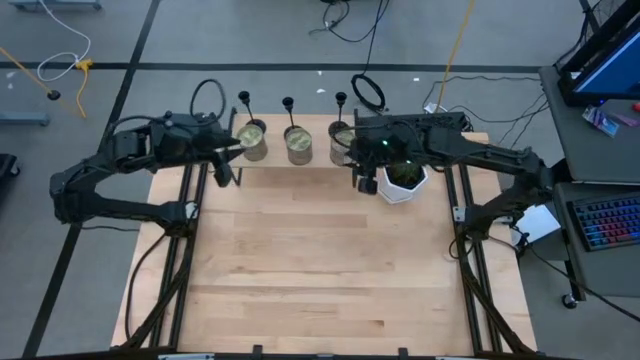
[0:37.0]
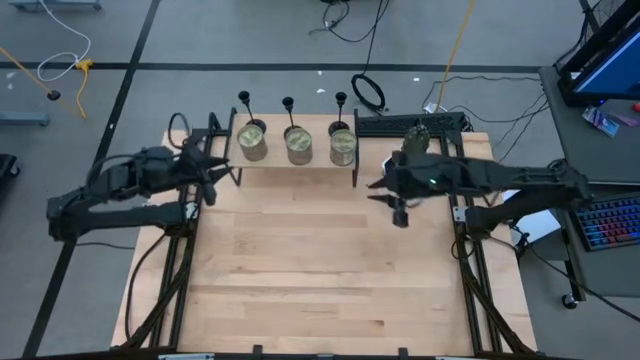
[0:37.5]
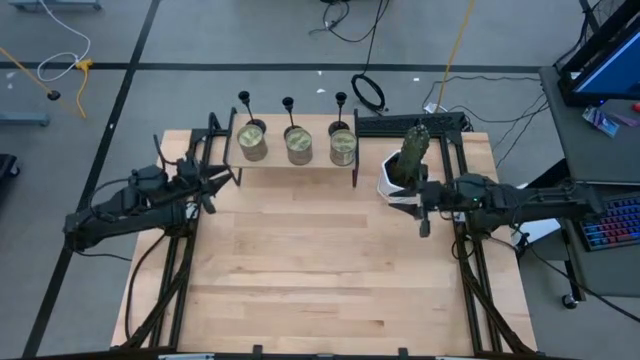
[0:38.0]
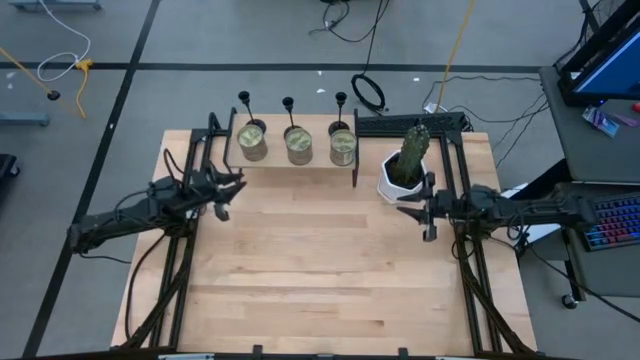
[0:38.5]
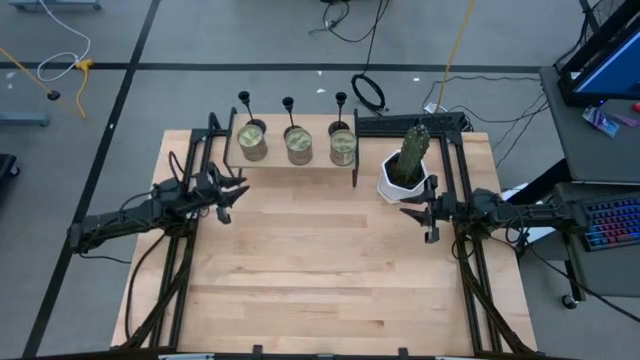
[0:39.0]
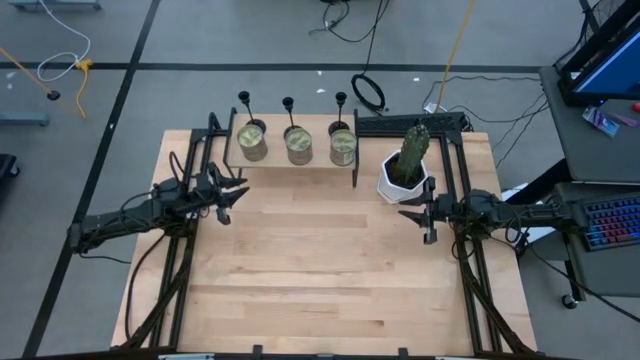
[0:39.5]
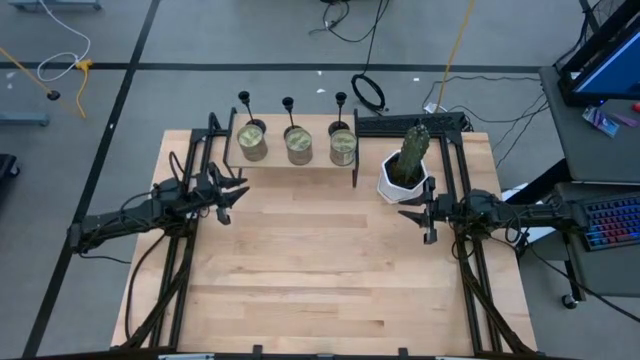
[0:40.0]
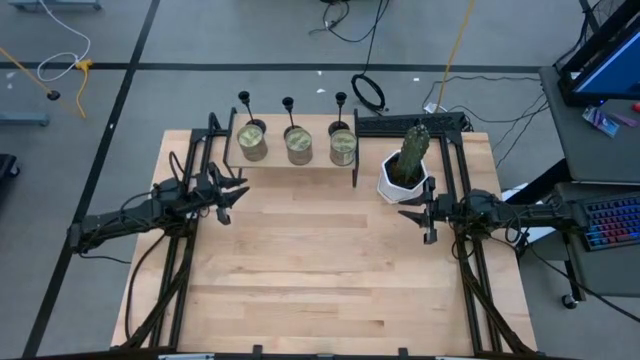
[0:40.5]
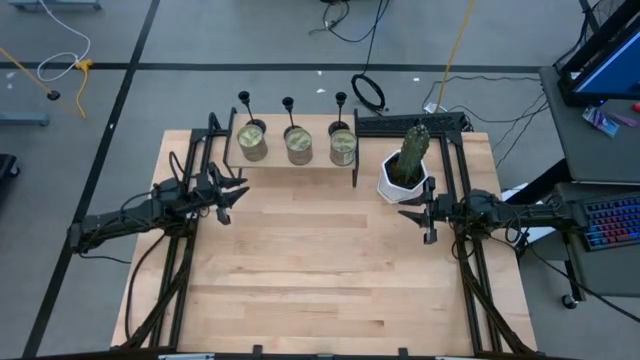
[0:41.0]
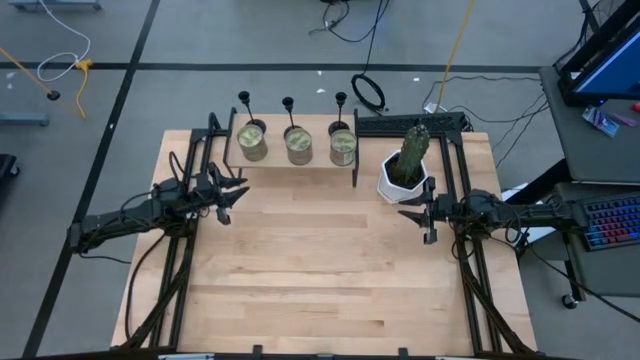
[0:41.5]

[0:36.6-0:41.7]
Task: Pick & Place candle stick holders
Return to Home Position

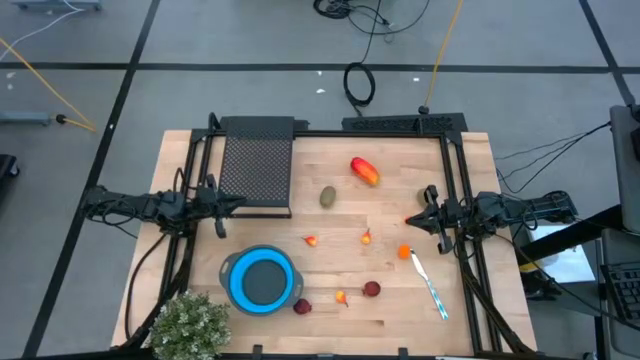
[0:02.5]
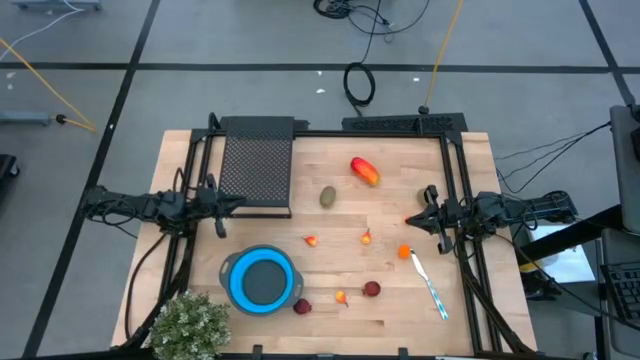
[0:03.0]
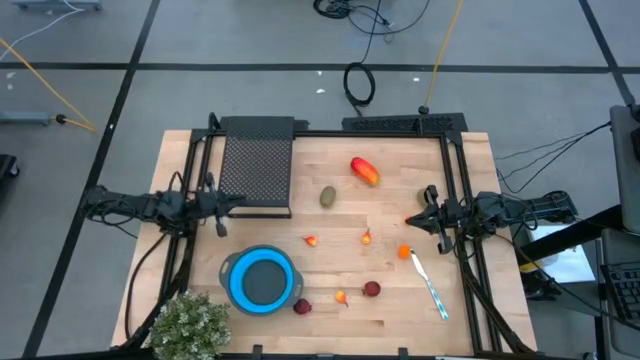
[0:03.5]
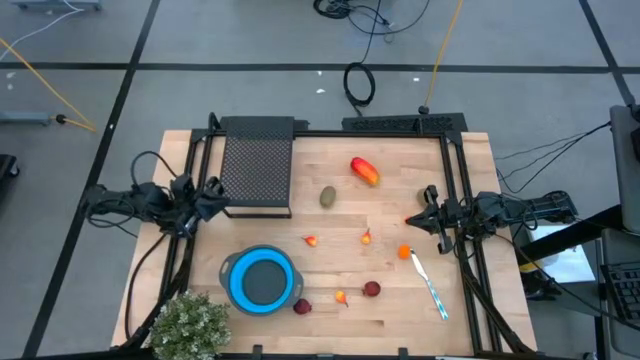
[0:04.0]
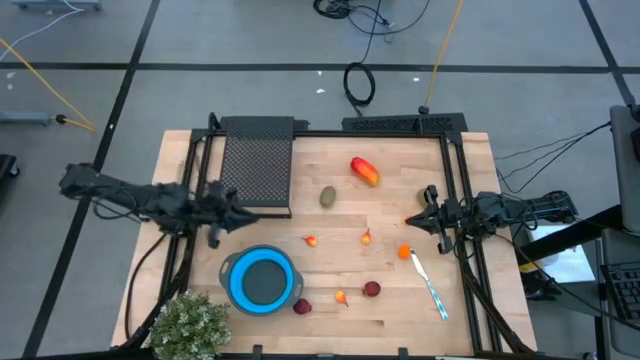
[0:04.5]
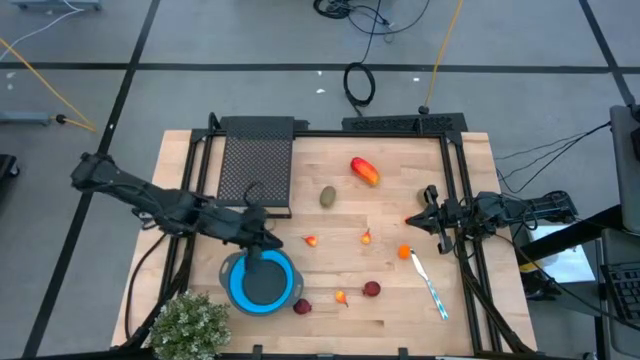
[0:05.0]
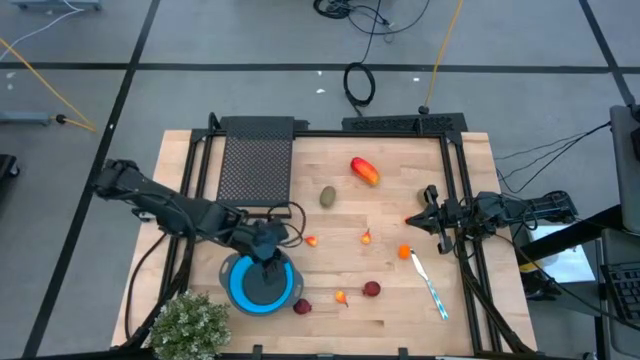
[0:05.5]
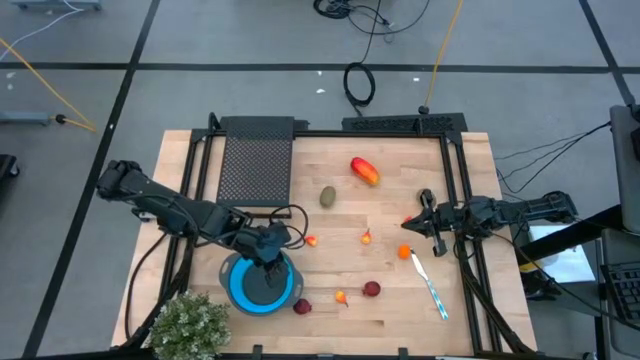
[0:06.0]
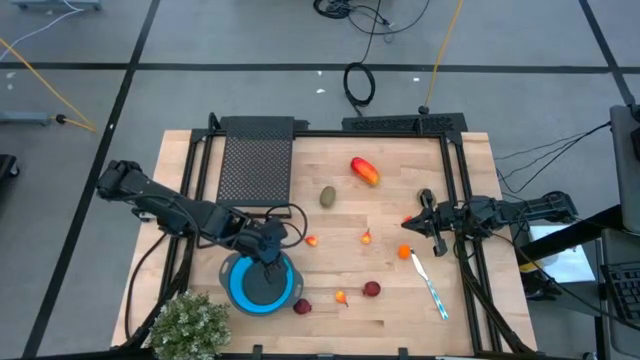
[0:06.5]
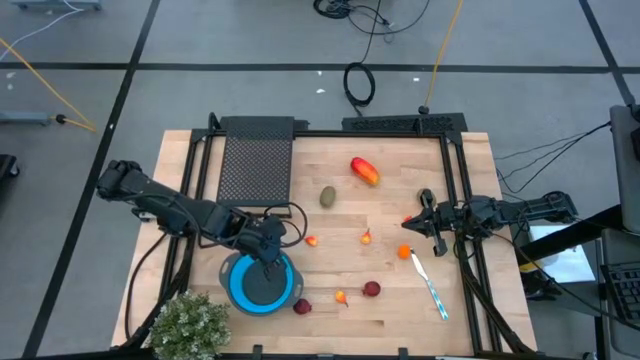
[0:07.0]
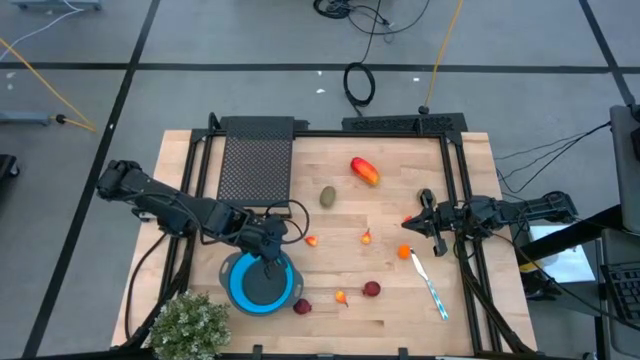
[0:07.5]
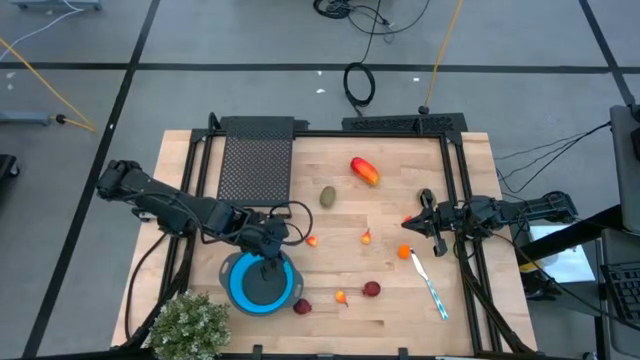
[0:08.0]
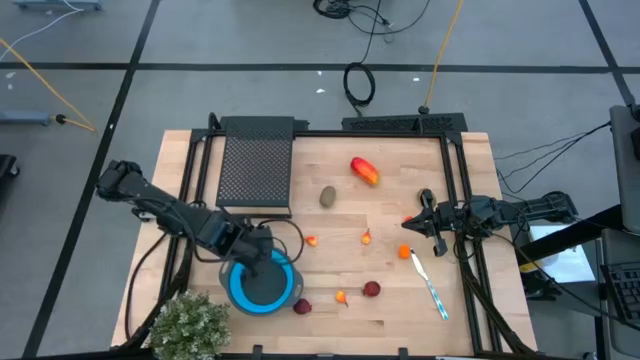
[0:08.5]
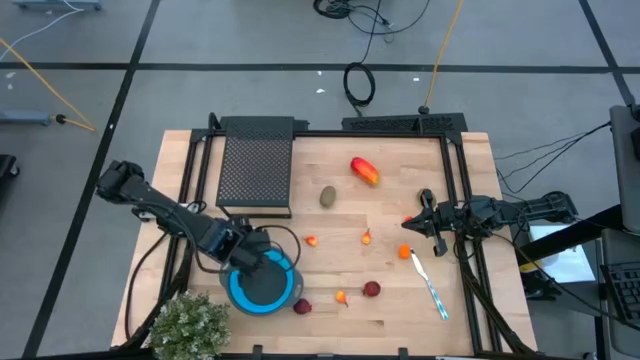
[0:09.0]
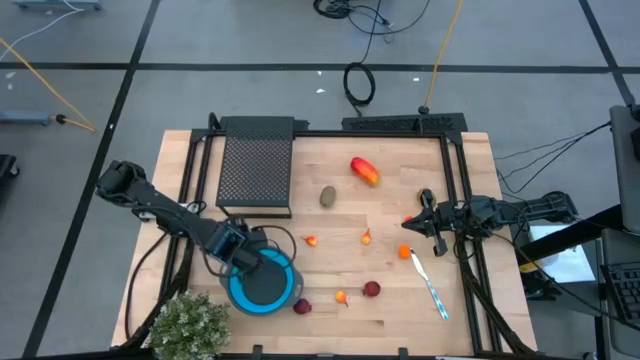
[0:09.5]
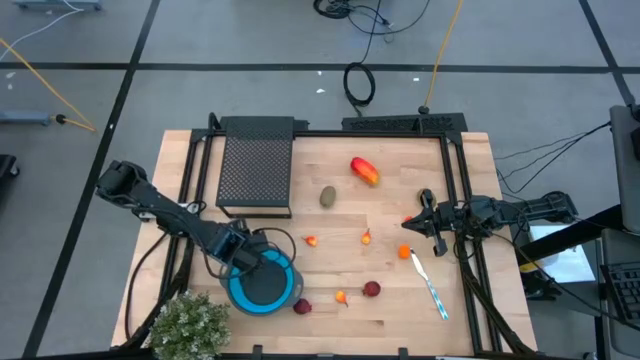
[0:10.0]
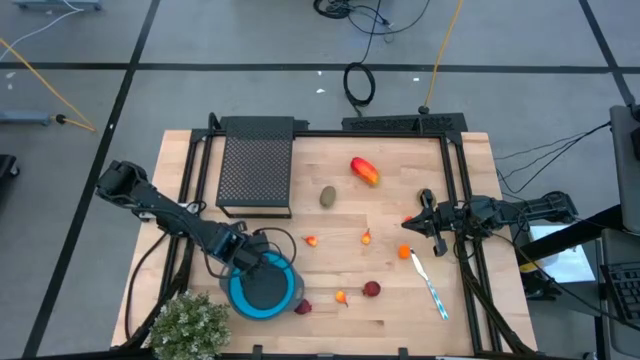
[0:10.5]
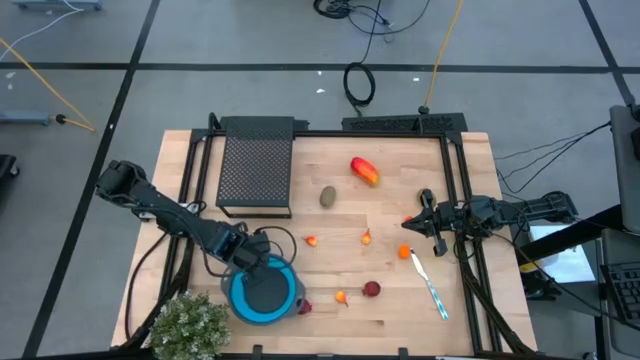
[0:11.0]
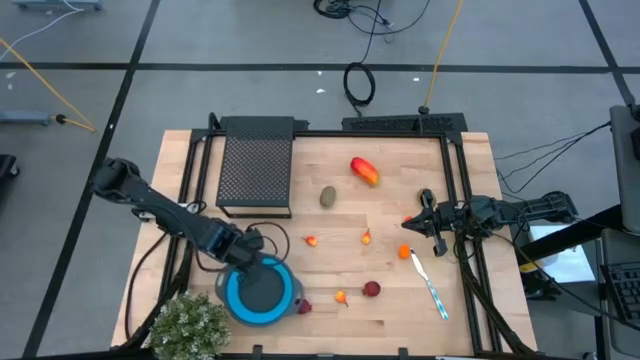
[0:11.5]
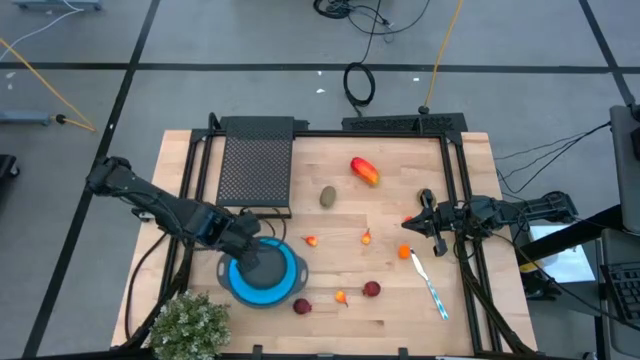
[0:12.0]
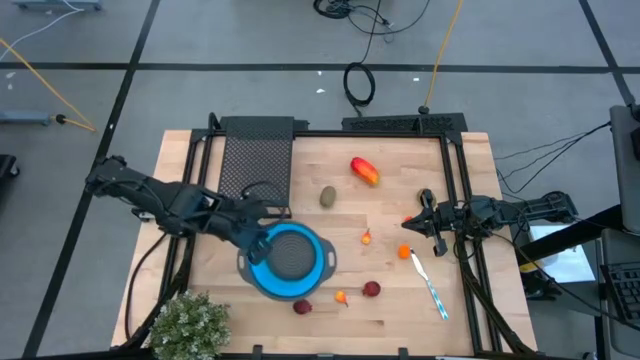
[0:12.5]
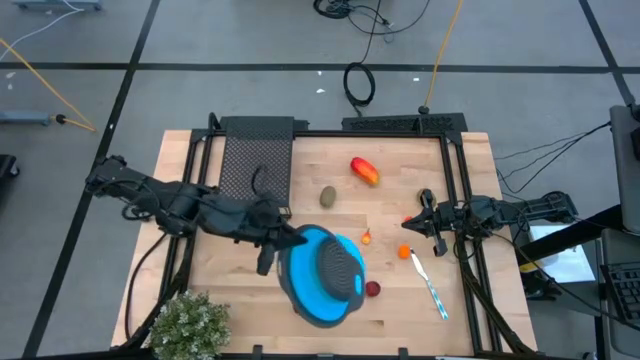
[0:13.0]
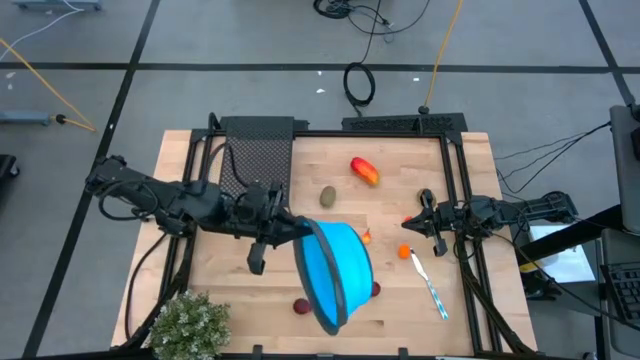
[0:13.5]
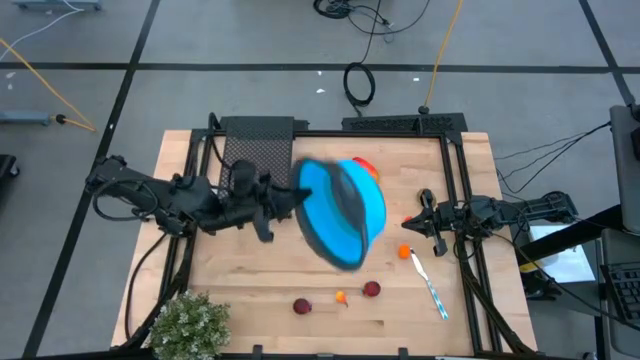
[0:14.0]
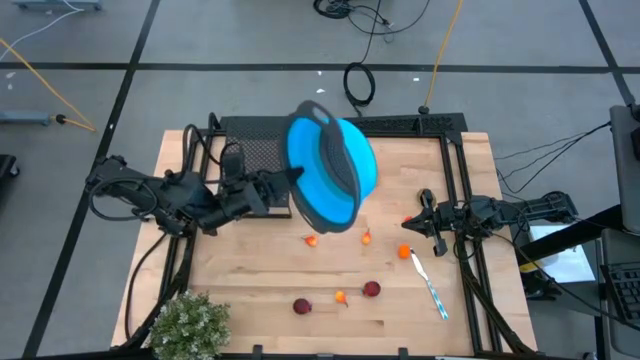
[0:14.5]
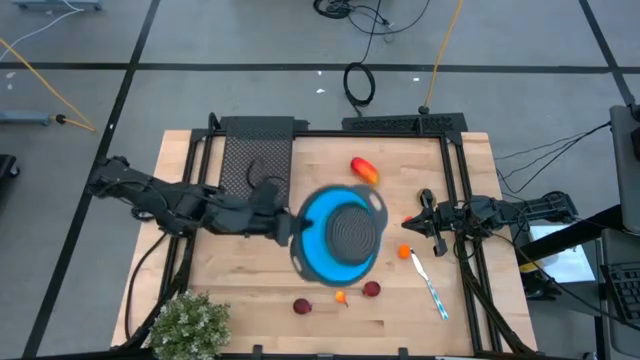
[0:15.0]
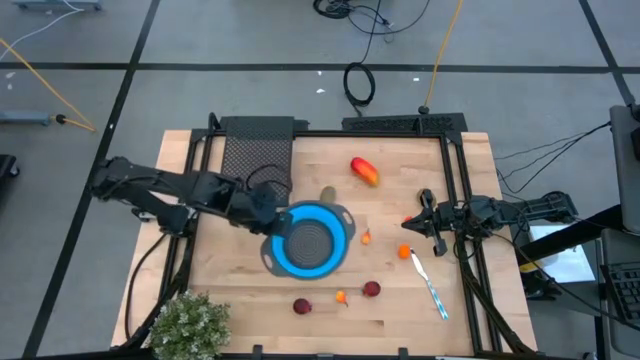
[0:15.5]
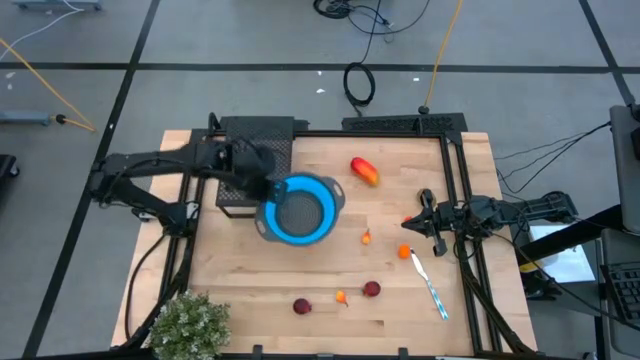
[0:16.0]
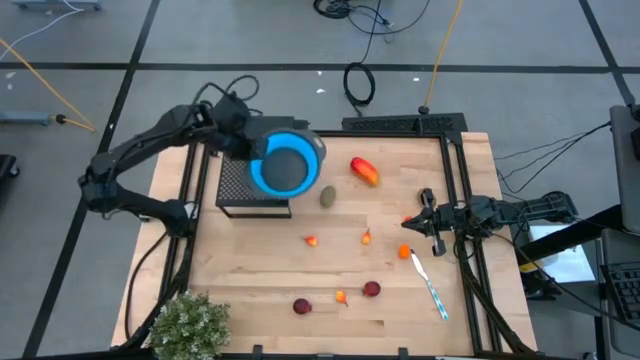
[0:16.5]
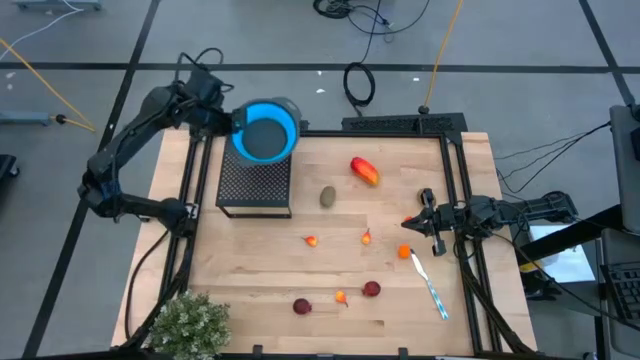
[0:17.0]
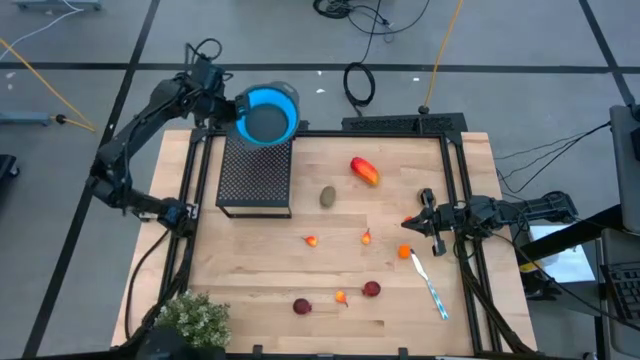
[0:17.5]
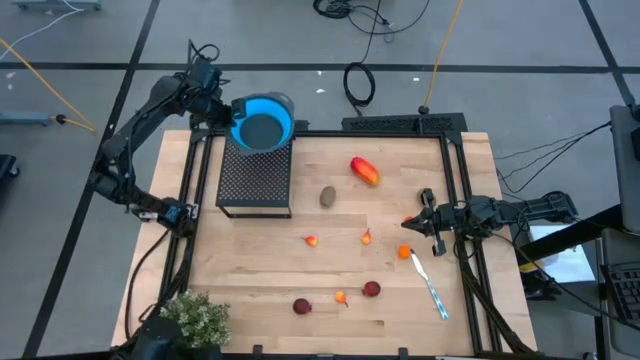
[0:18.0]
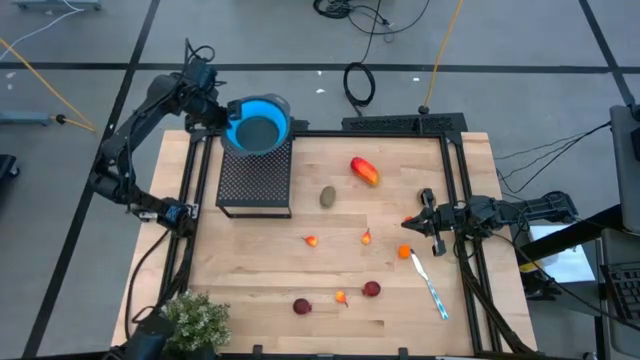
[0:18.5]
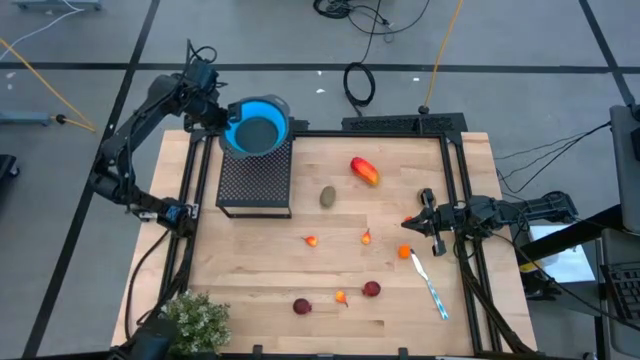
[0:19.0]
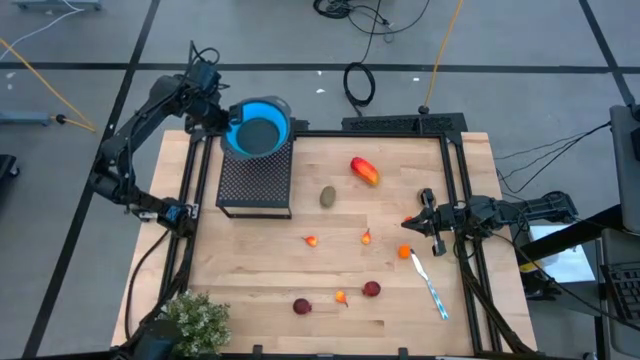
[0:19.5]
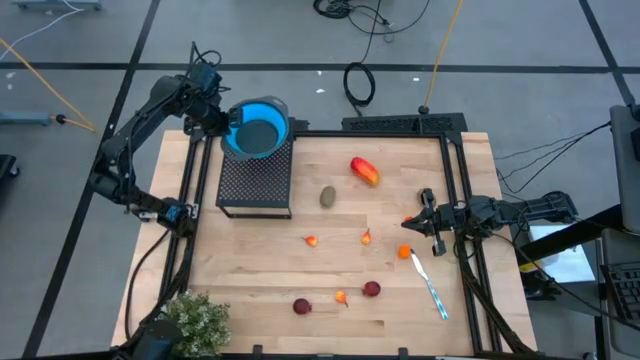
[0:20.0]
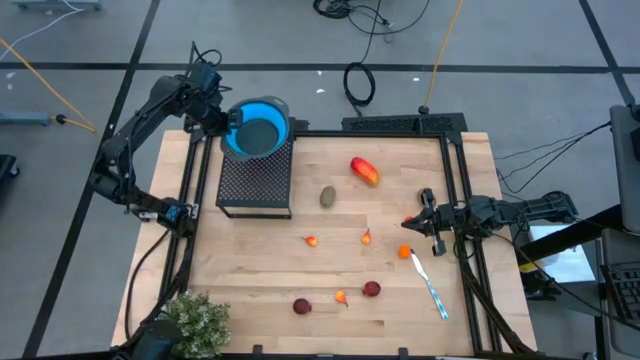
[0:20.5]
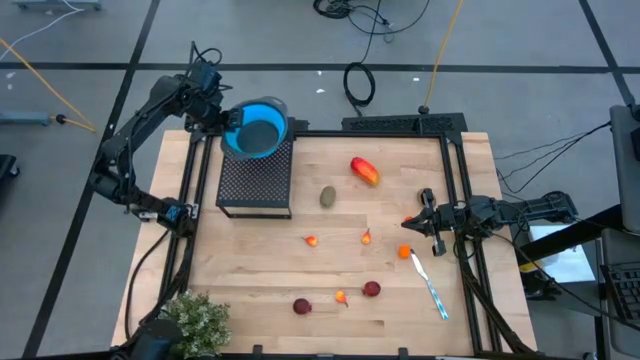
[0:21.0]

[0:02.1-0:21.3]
Task: Pick & Place Fruit
Put the blue strainer bowl on the shelf
